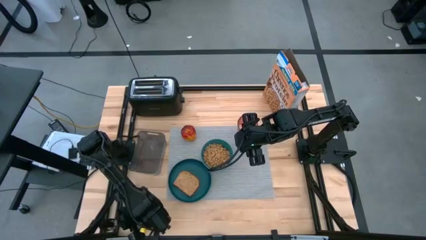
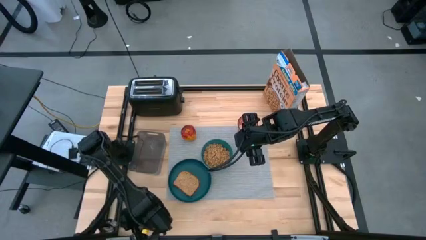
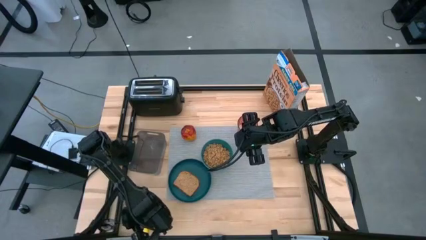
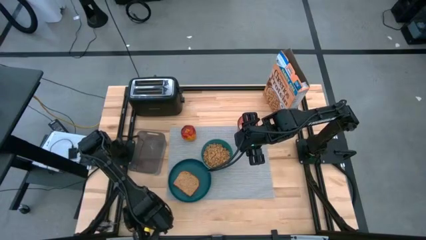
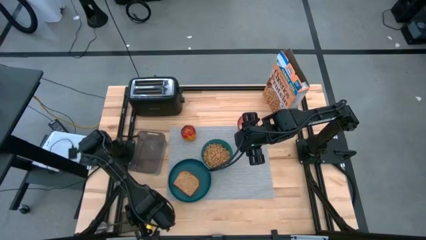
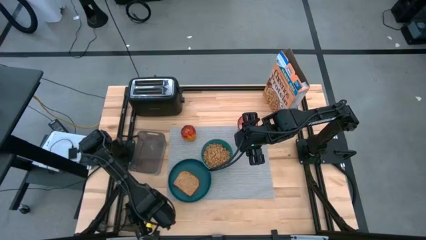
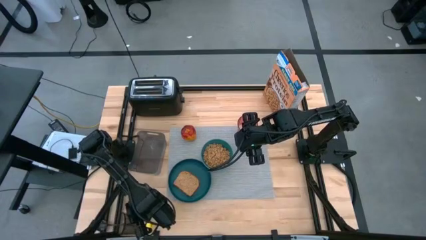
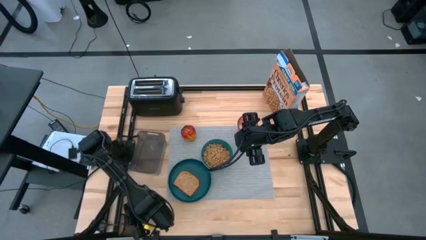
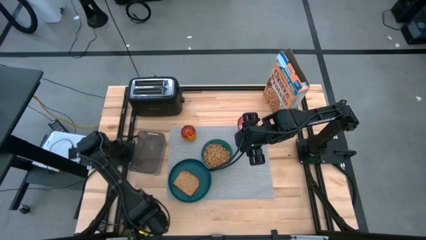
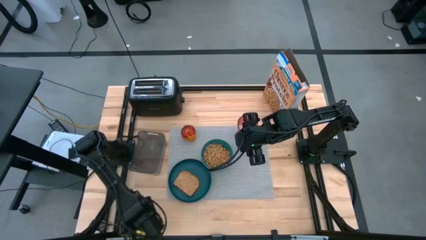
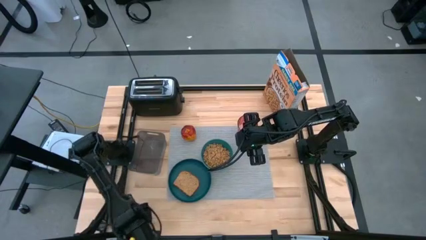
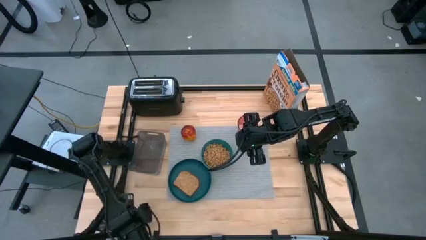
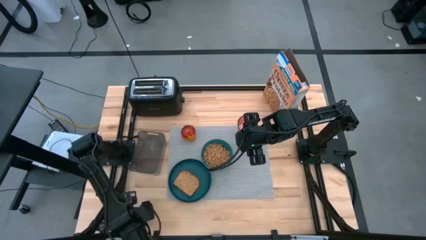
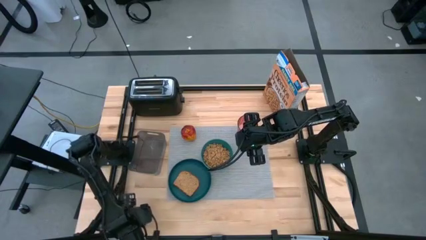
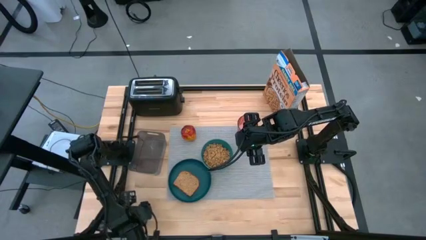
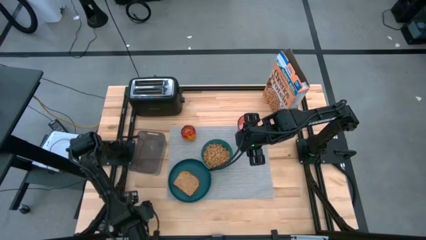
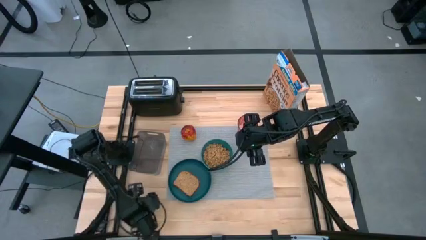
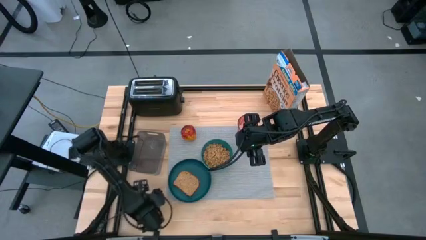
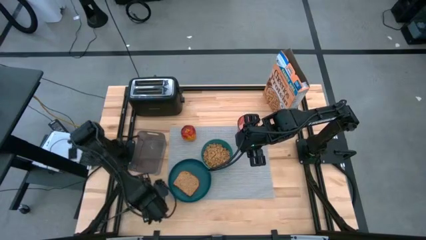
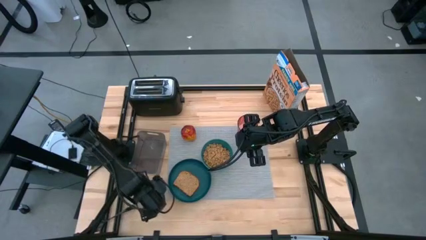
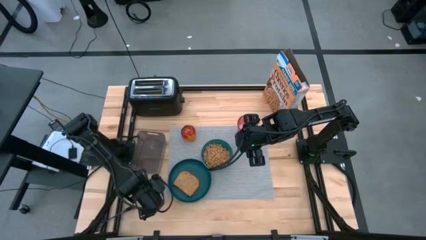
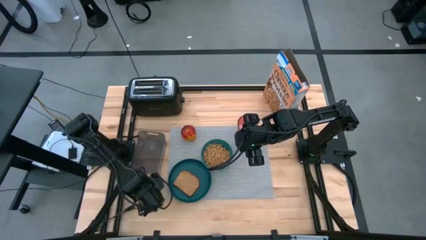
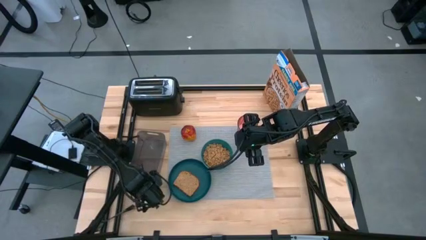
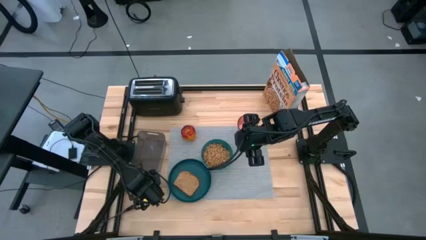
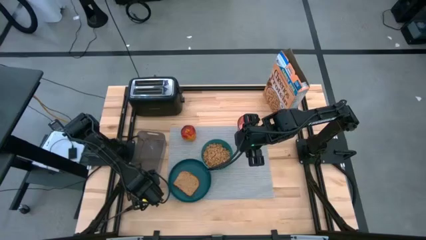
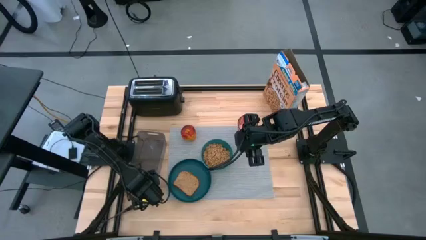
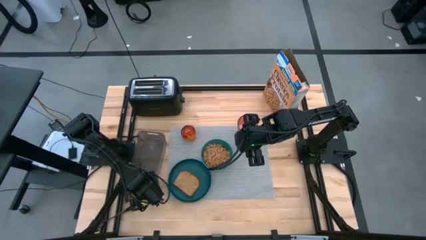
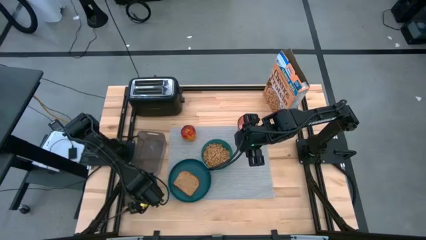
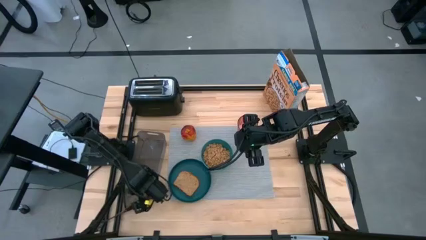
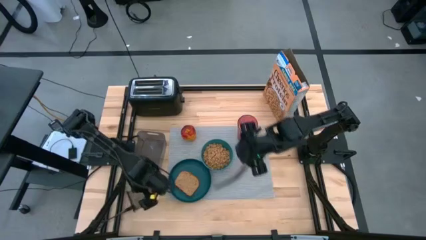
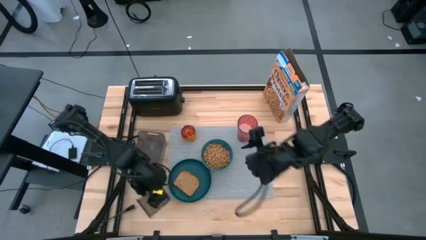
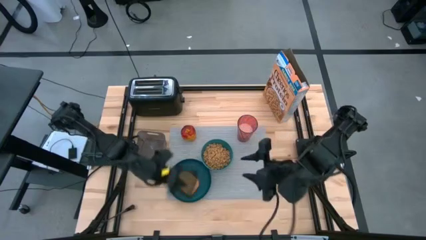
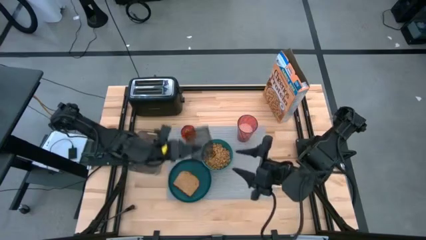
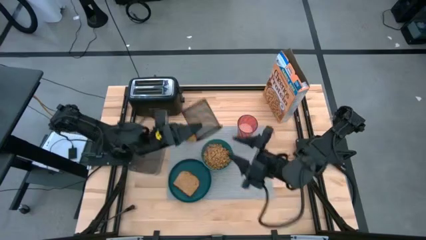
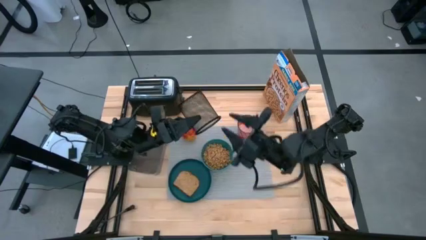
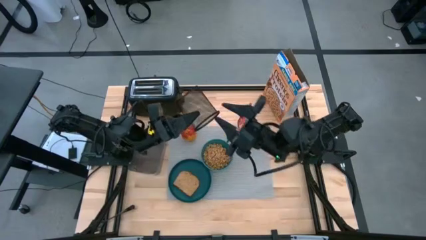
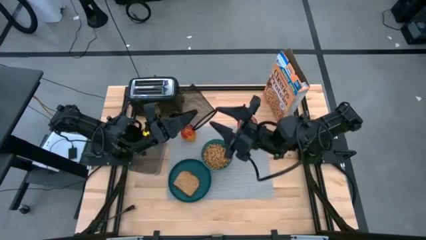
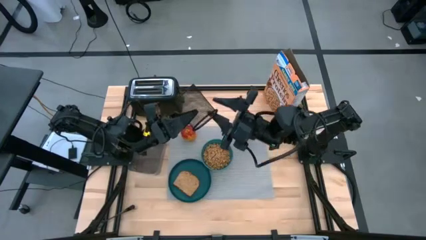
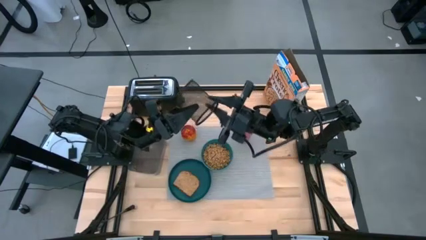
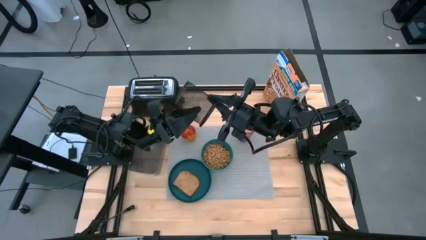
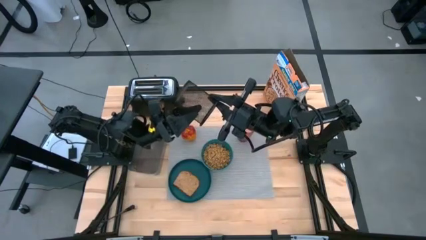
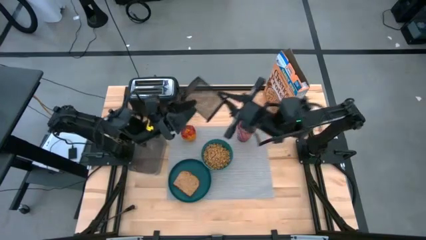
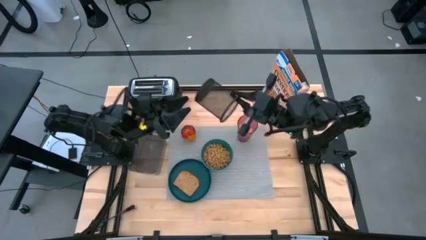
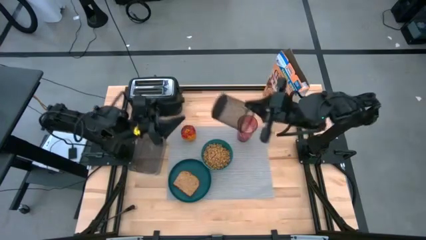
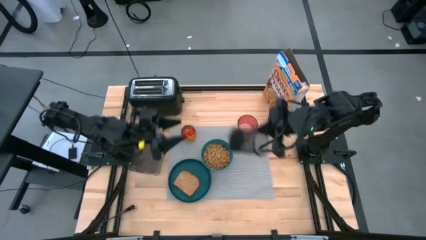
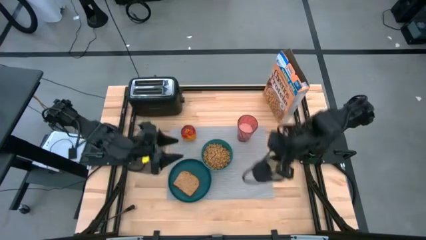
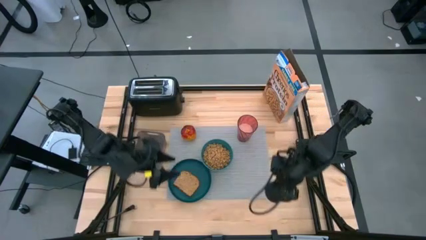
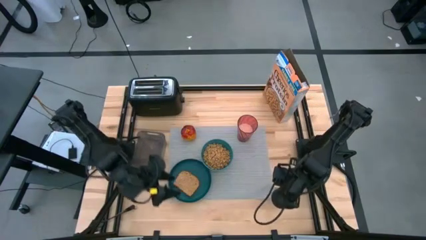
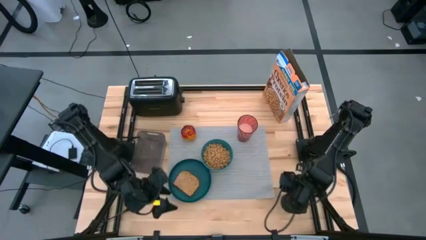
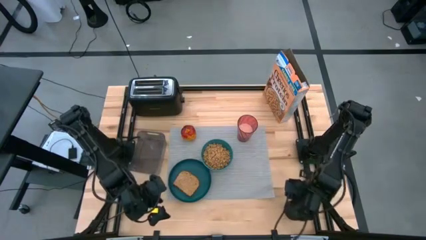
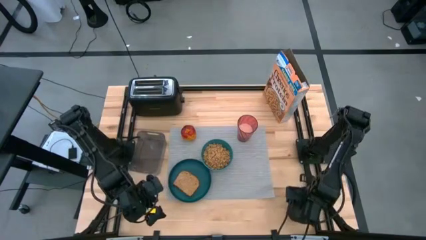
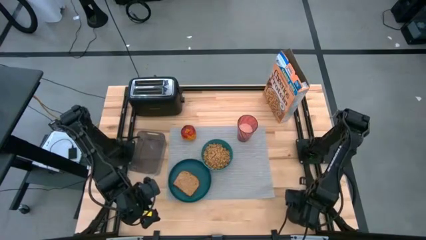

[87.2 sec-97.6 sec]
Task: Arrange a breakfast setting
Move the mesh desk to the bottom right of the table

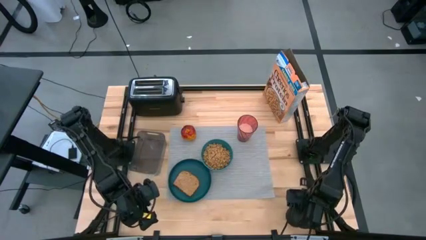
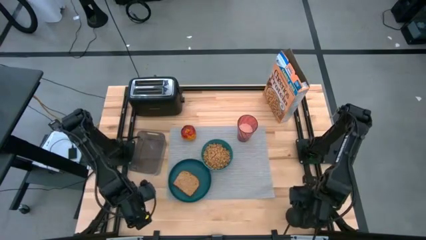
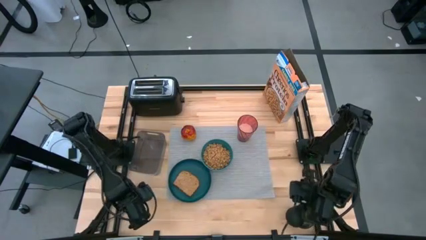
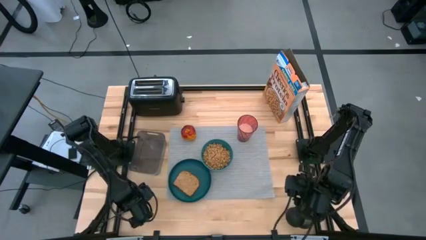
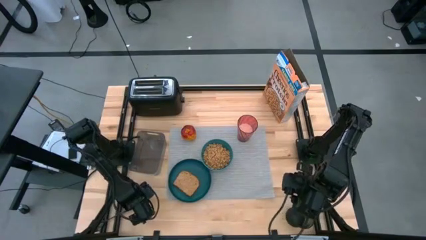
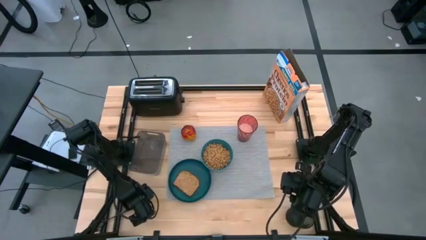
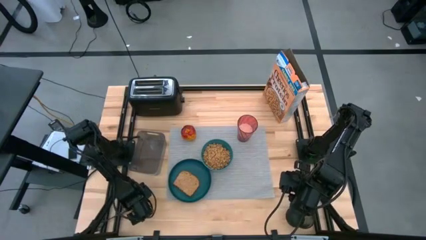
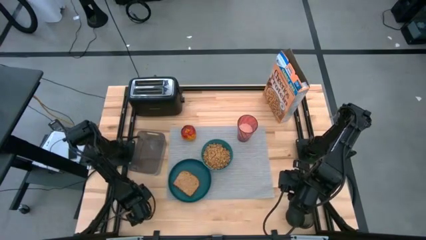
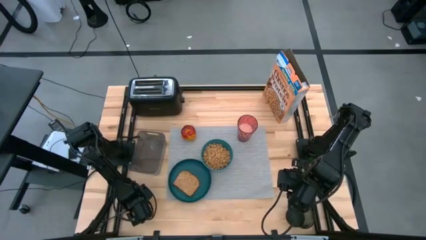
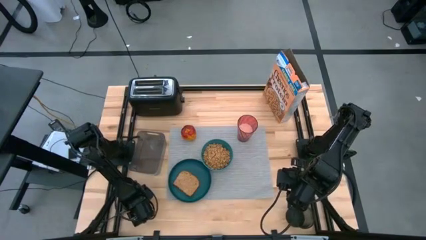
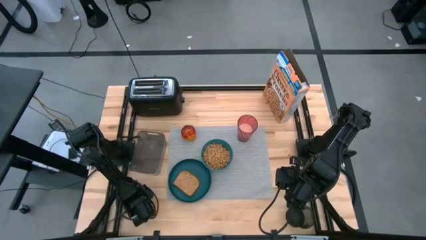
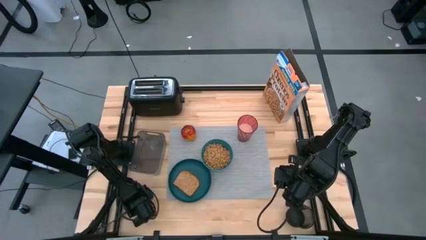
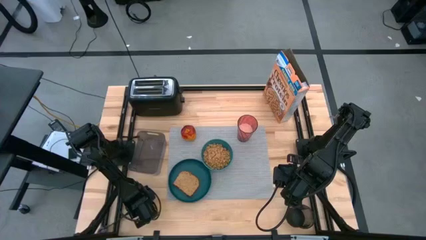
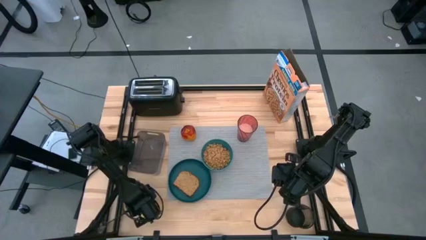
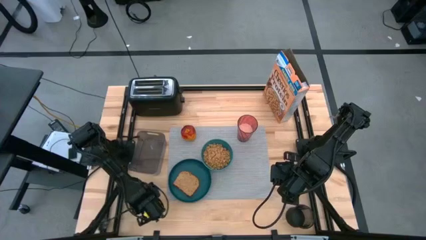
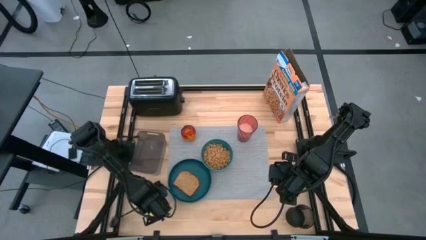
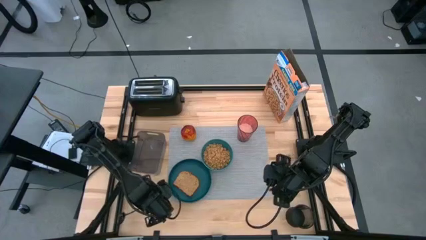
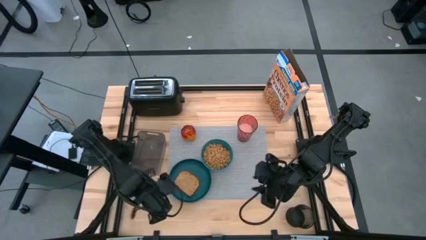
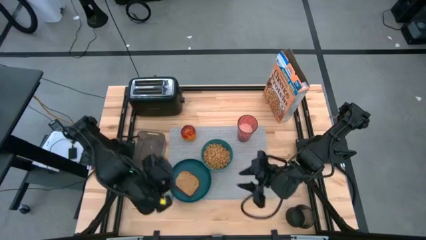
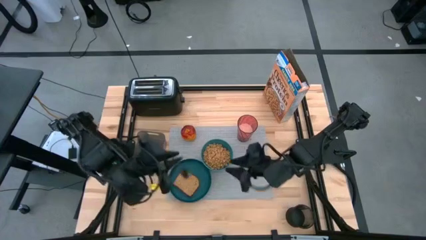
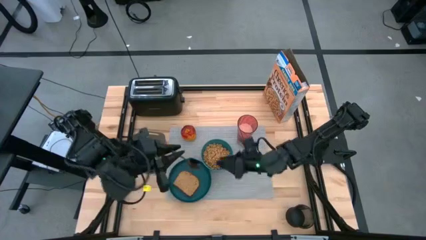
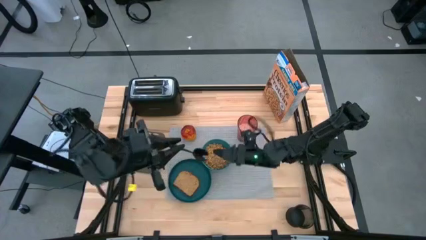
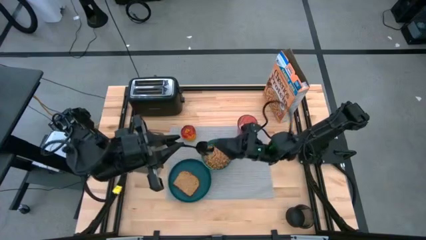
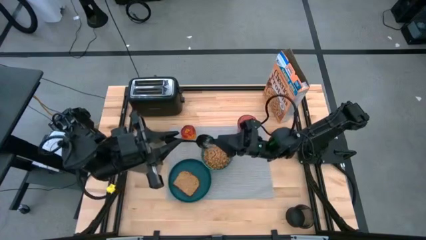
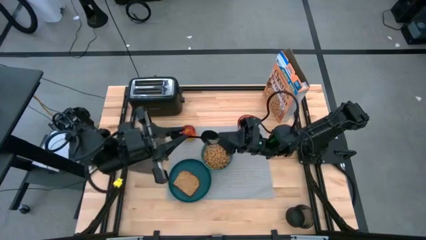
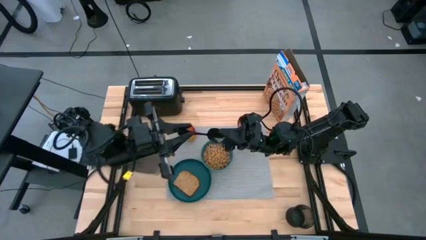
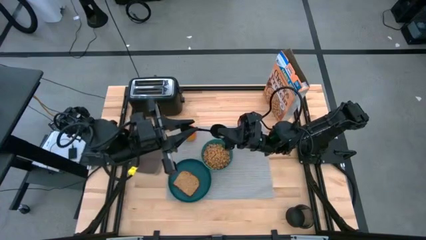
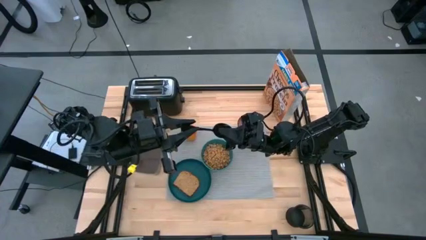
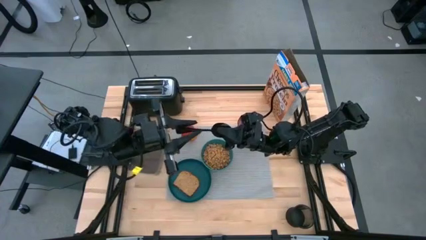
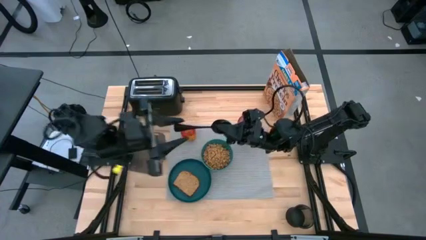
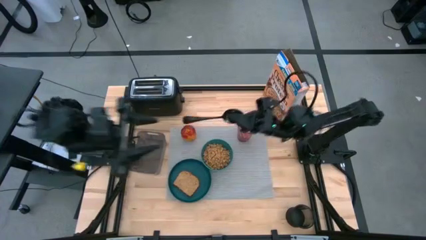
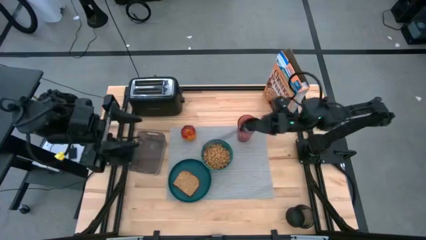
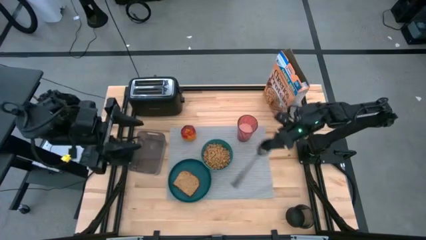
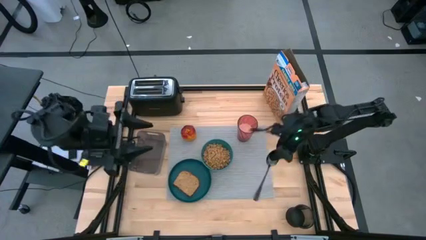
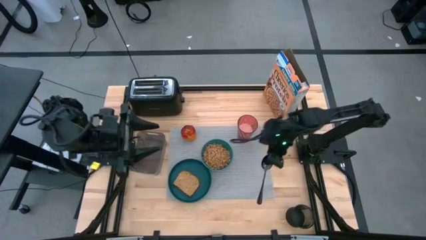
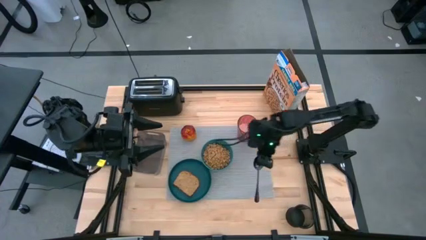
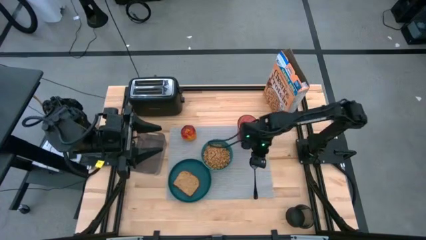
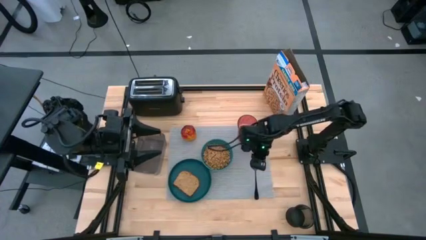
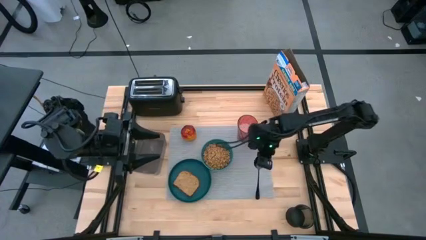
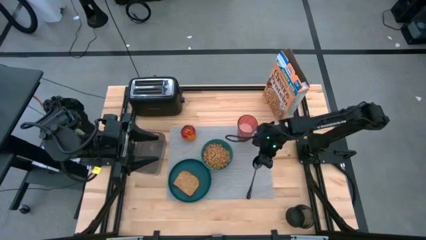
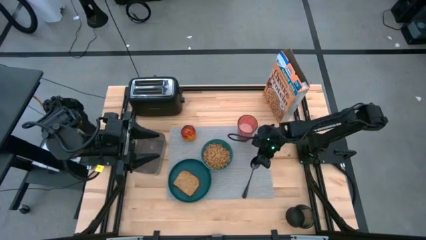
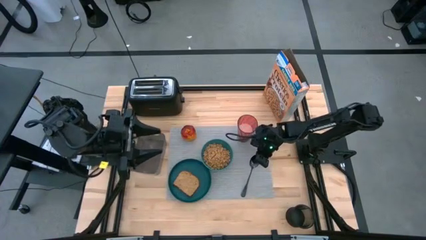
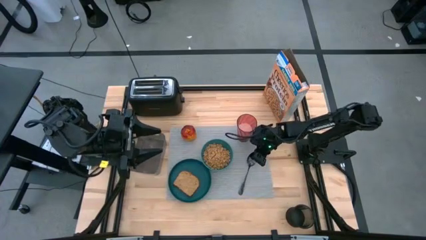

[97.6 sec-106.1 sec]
Put the black spoon on the mat
